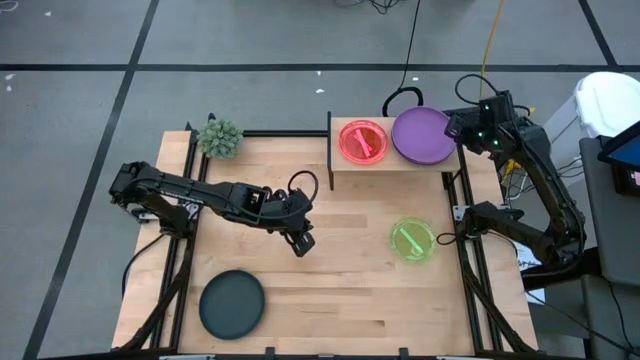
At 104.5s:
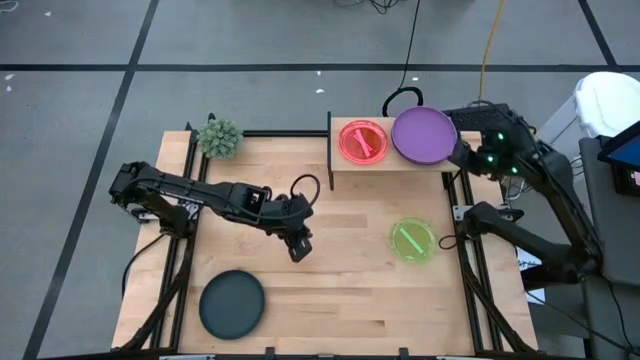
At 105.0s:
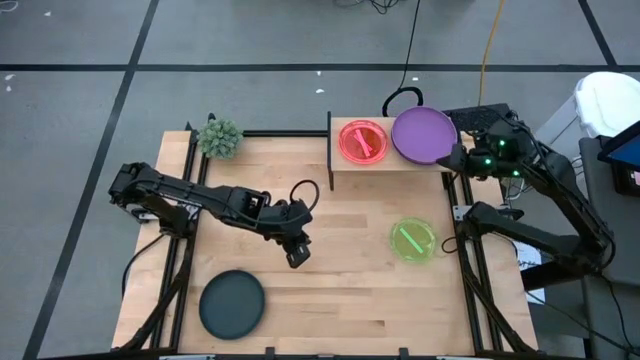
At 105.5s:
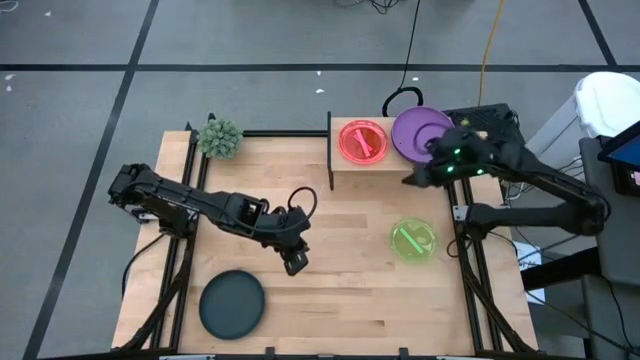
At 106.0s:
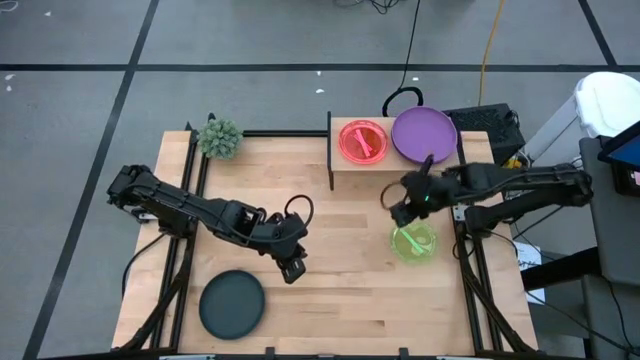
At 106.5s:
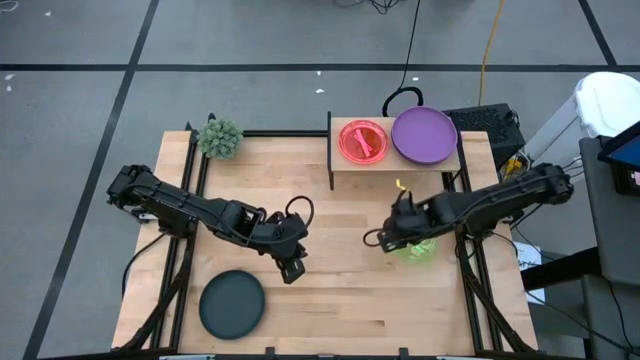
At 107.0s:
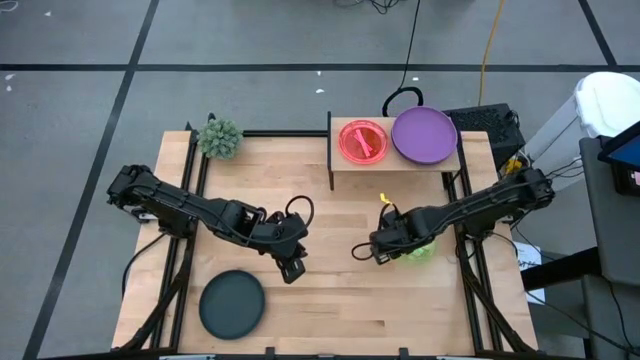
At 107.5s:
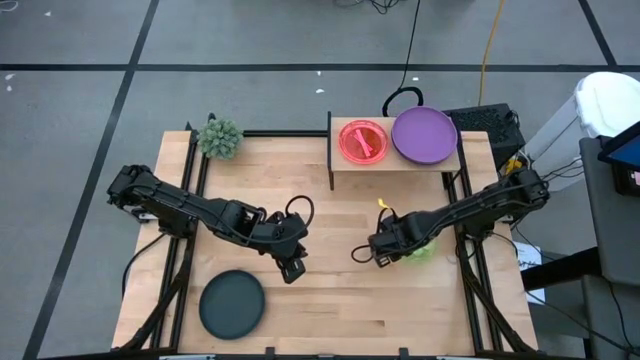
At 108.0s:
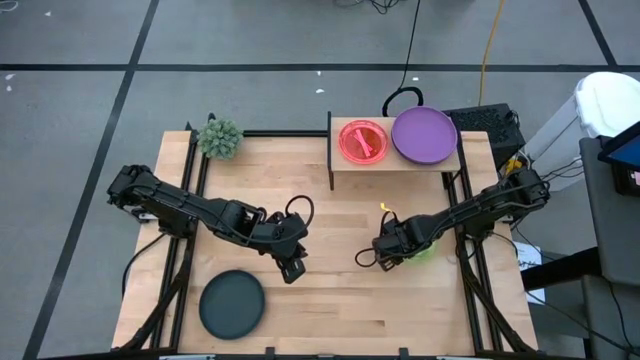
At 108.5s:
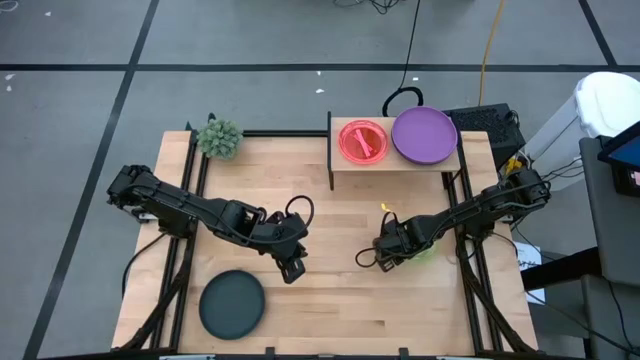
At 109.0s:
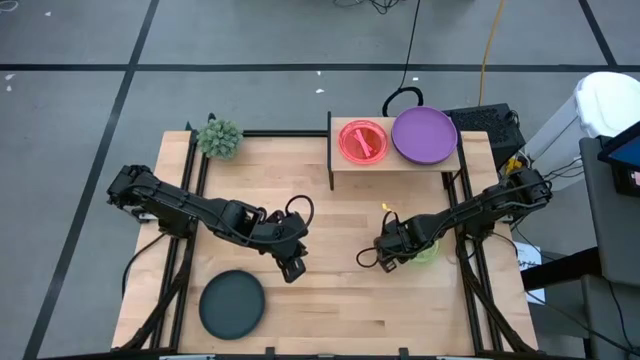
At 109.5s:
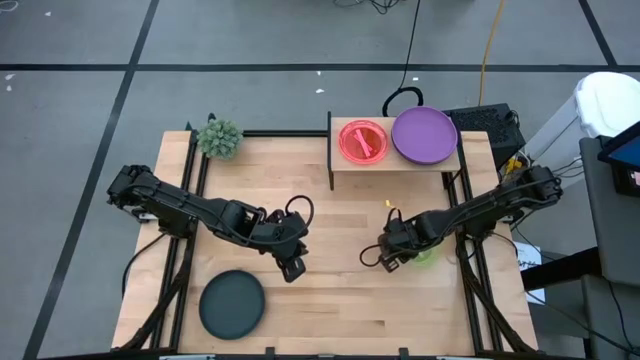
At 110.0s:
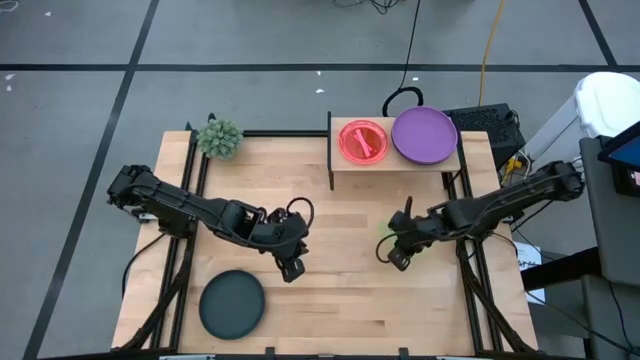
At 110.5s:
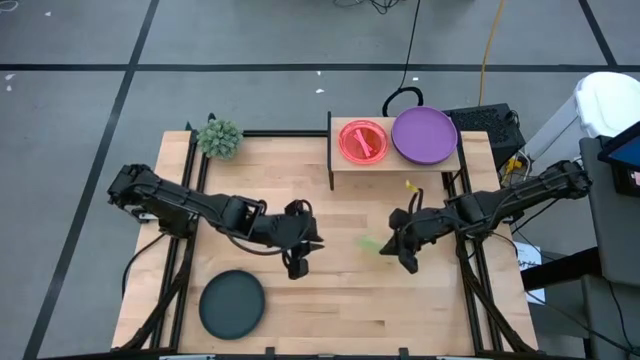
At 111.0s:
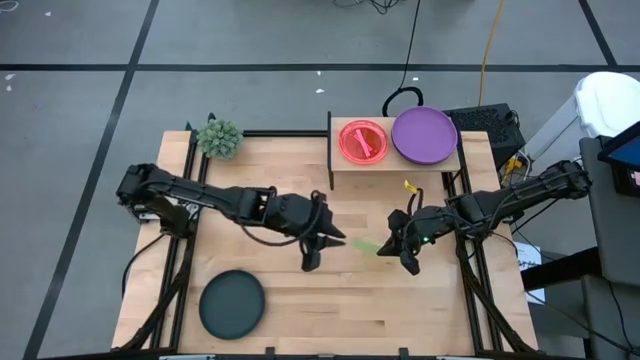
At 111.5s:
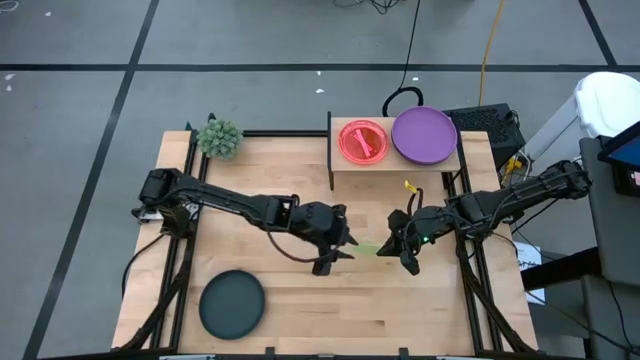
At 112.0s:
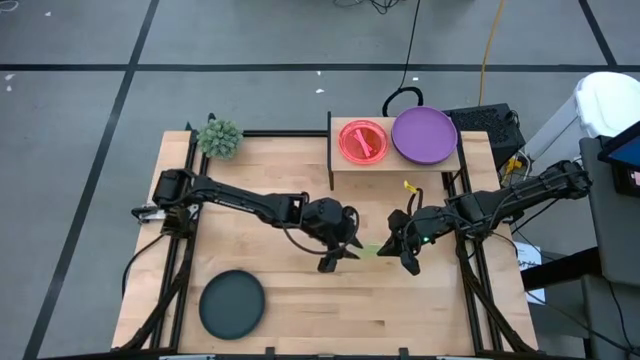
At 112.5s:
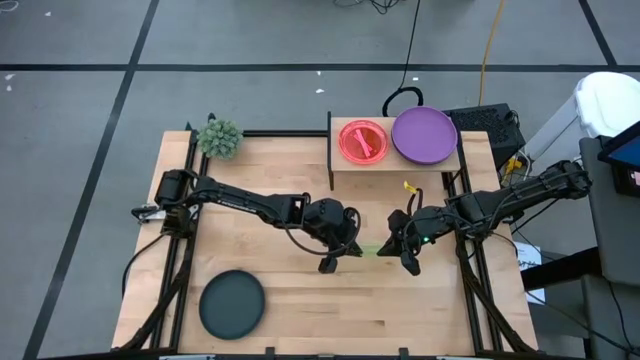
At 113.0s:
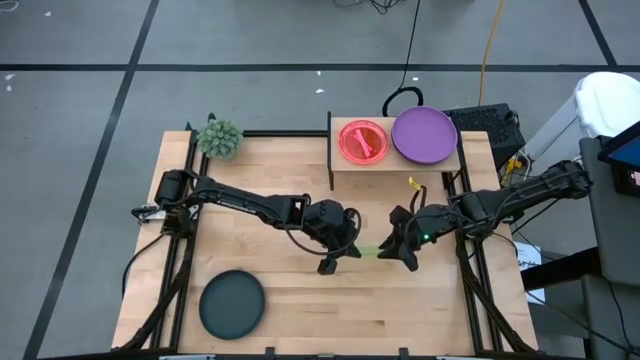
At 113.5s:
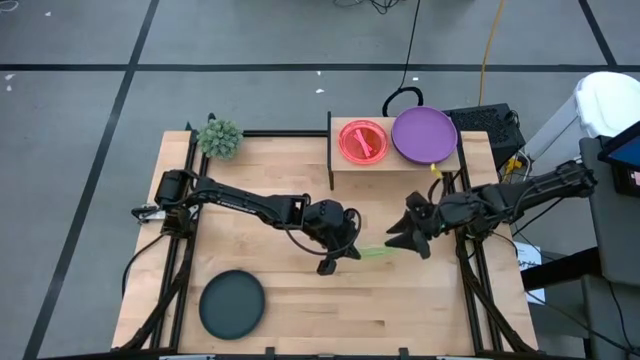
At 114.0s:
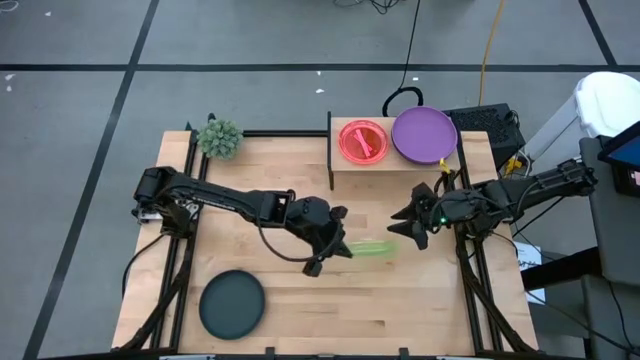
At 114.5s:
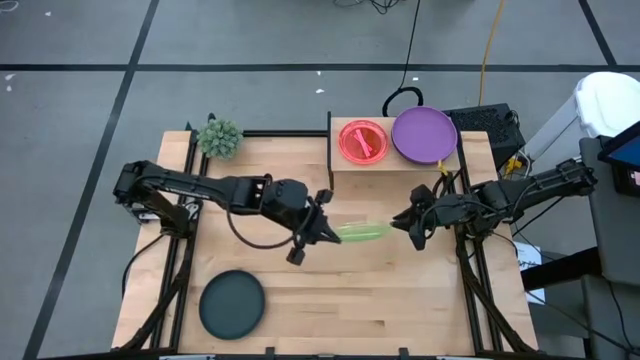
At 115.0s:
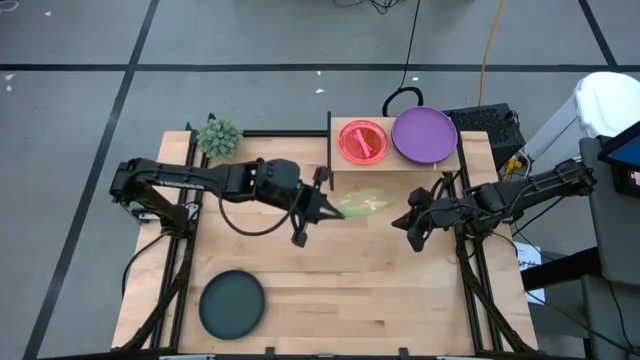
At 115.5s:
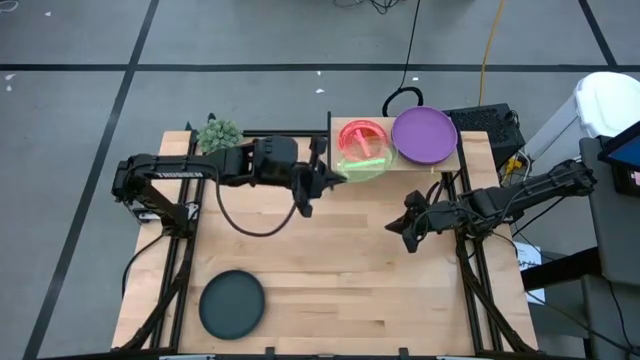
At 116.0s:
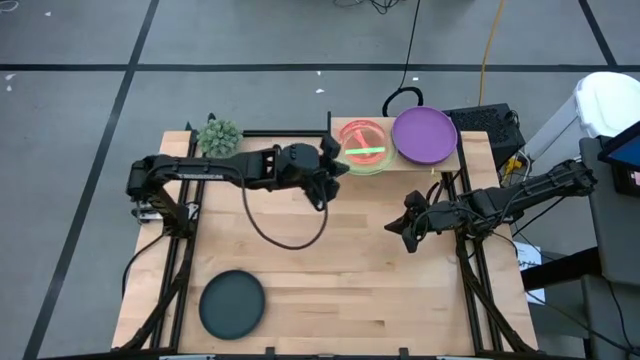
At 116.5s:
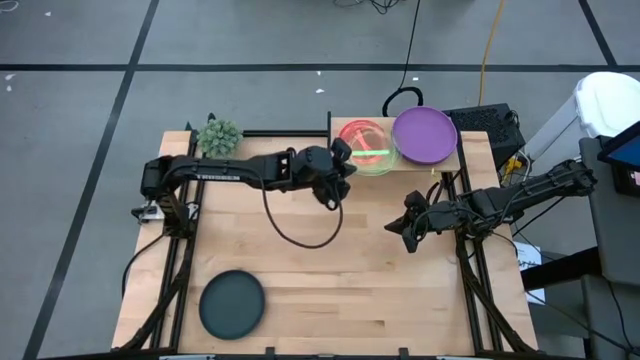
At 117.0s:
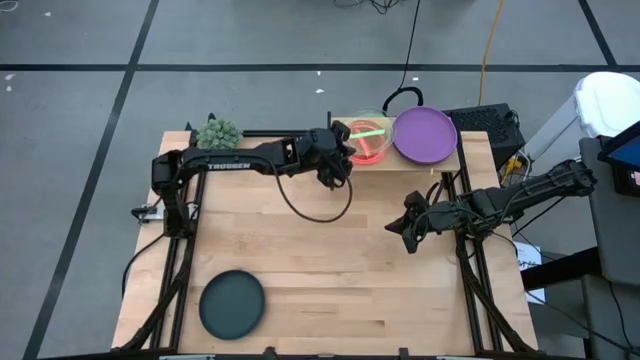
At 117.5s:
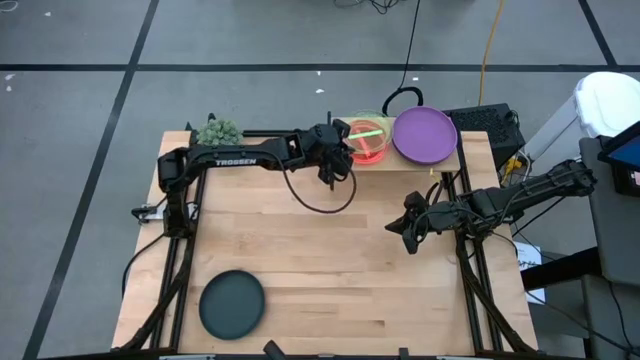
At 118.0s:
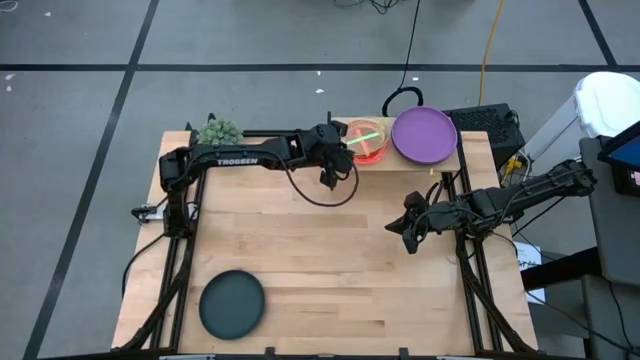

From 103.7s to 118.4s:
Task: Place and stack plates onto a shelf
Stack the green plate on the pink plate on the shelf

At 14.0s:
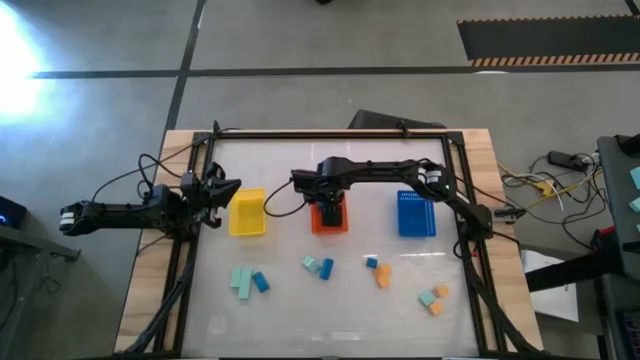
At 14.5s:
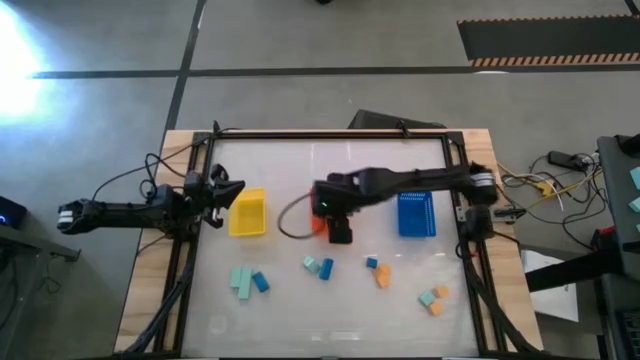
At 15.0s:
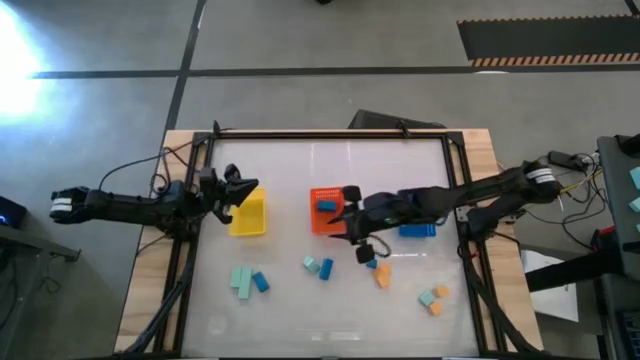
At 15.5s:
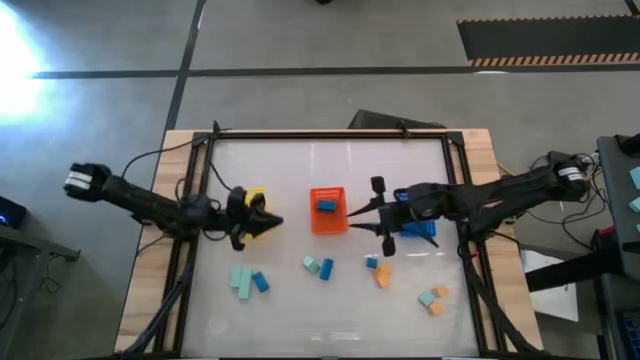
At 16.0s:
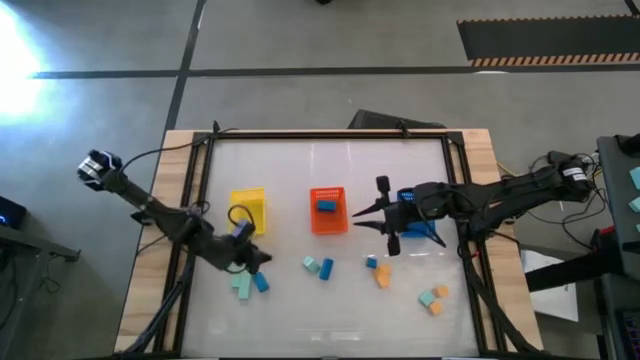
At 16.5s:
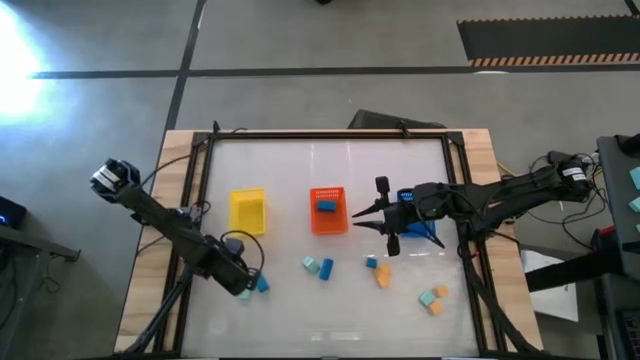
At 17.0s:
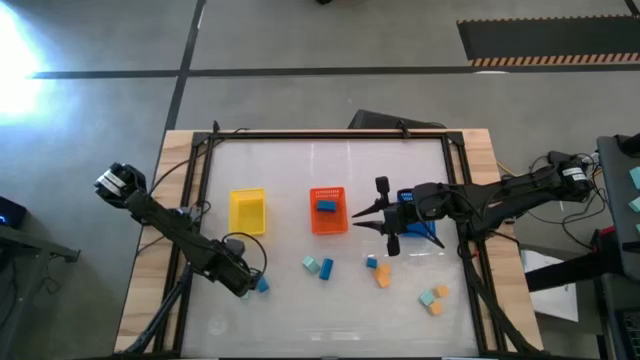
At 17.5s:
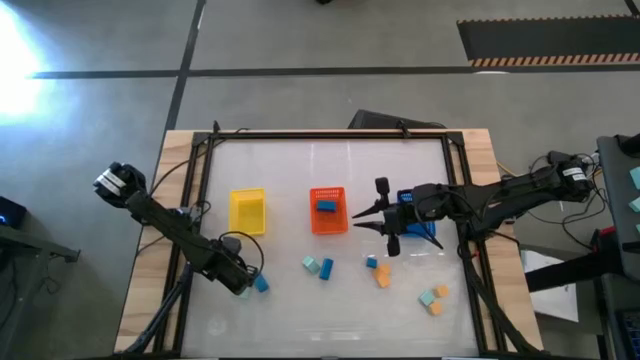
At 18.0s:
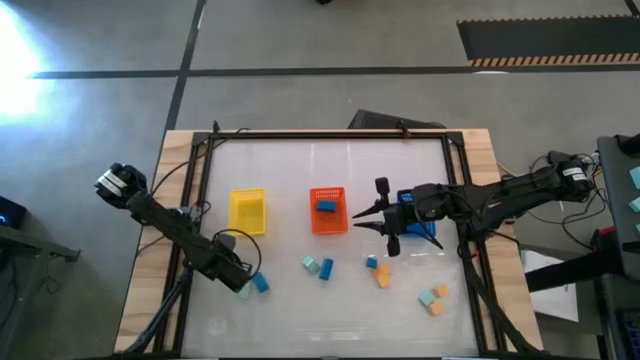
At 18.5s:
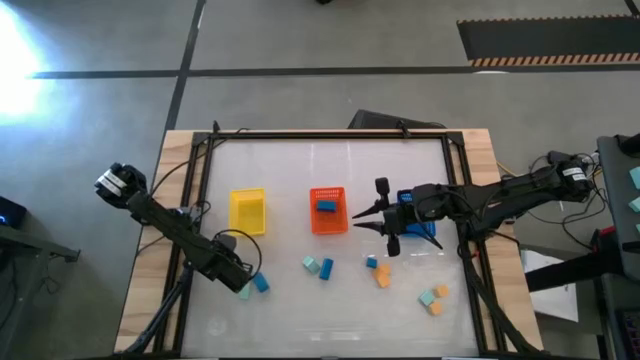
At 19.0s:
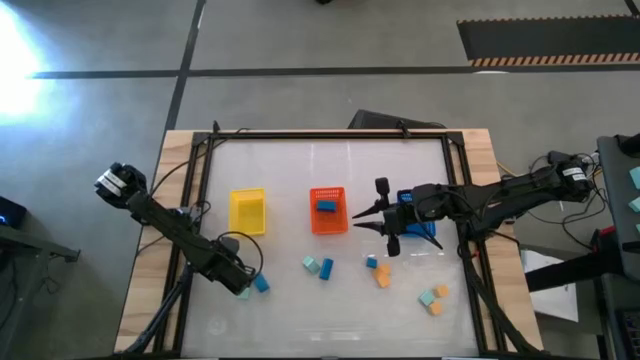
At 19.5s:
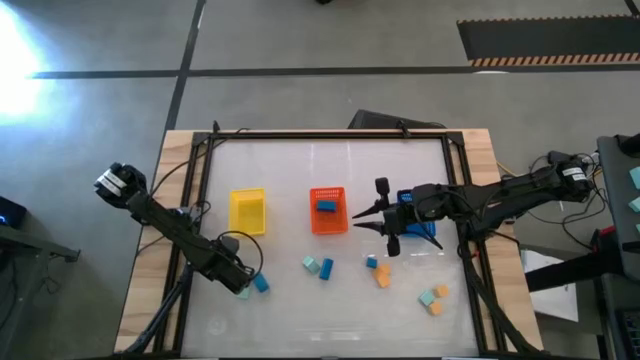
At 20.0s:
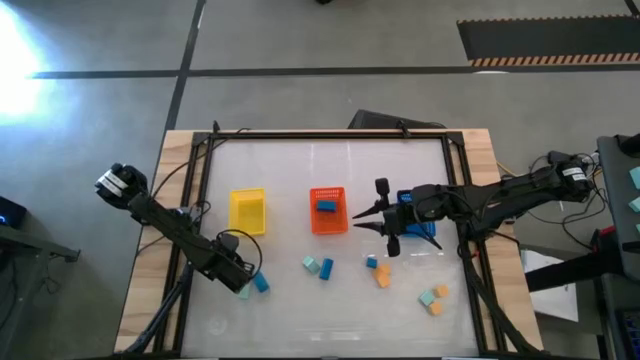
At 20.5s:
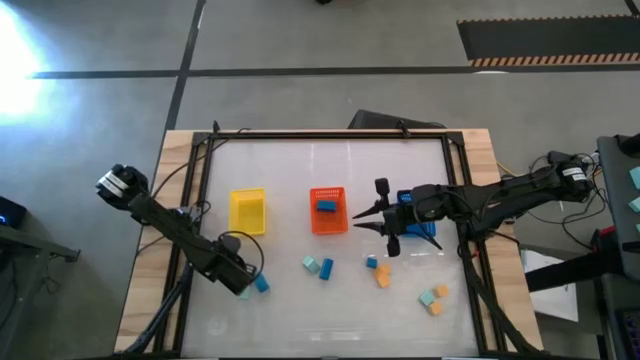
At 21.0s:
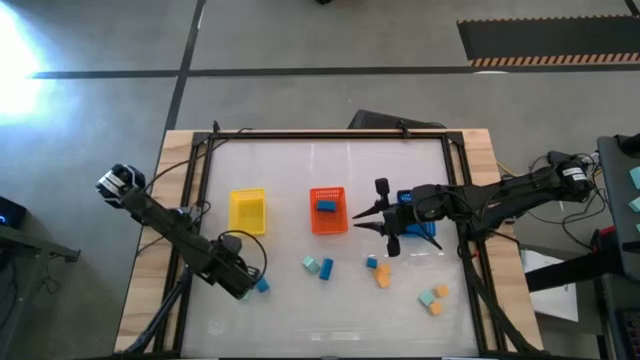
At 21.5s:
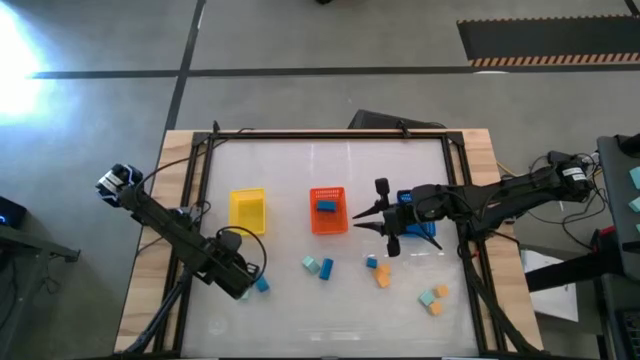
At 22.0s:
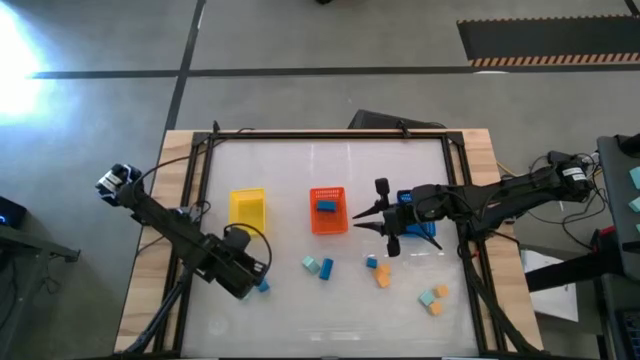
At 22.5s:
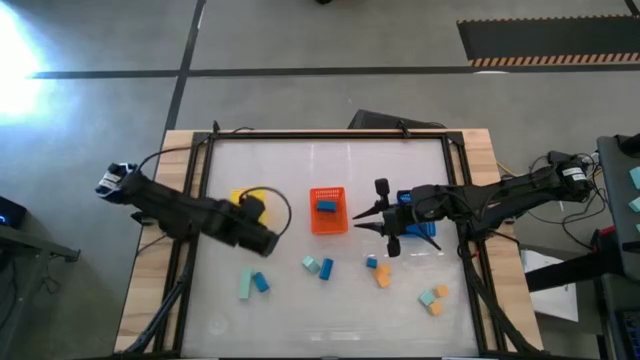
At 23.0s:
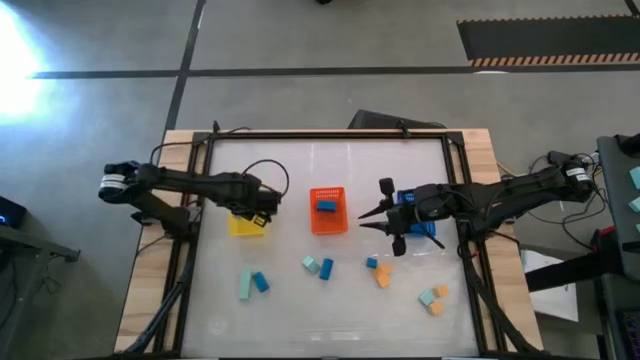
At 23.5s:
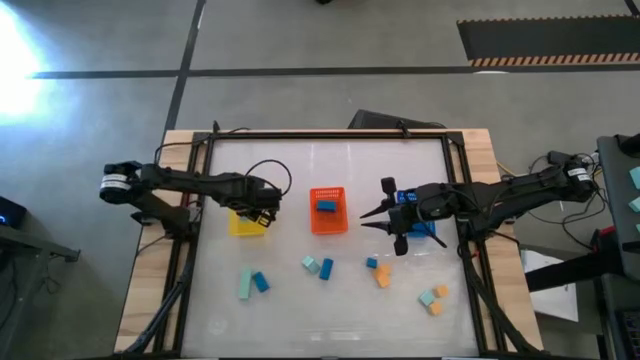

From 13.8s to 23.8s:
Task: Sort & place blocks by color
Put the light blue block into the yellow bin
